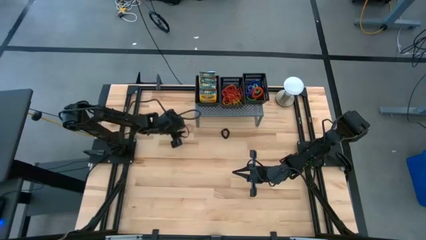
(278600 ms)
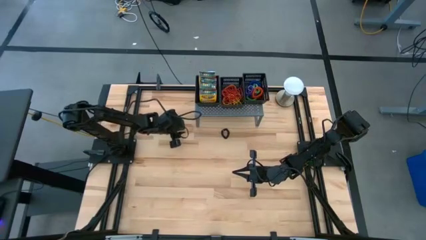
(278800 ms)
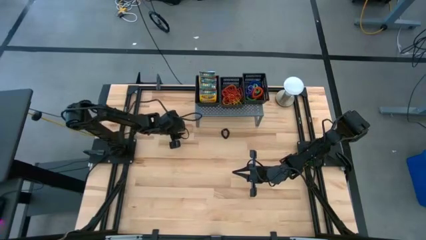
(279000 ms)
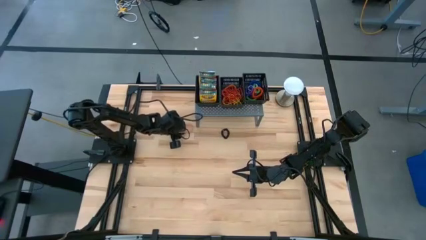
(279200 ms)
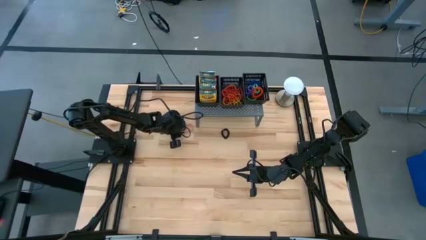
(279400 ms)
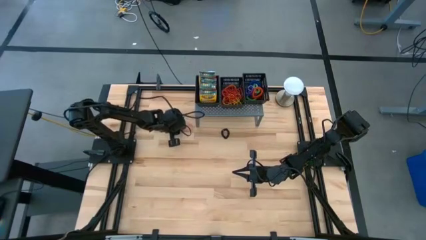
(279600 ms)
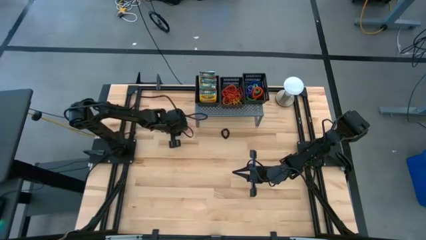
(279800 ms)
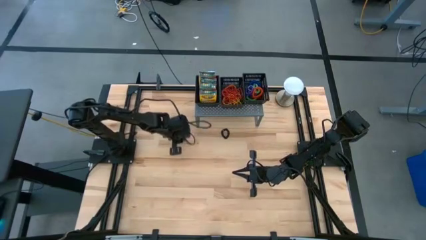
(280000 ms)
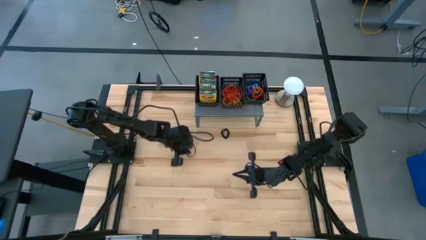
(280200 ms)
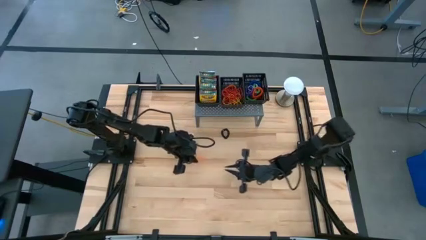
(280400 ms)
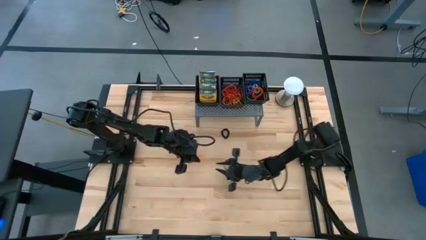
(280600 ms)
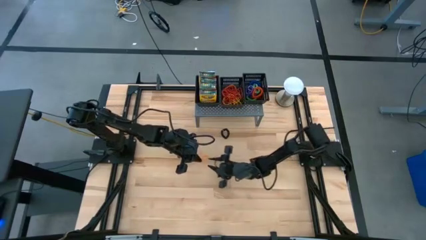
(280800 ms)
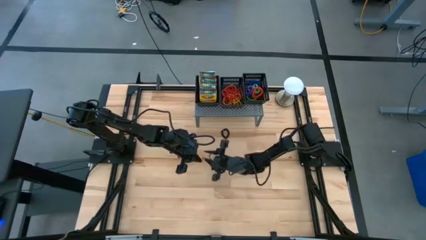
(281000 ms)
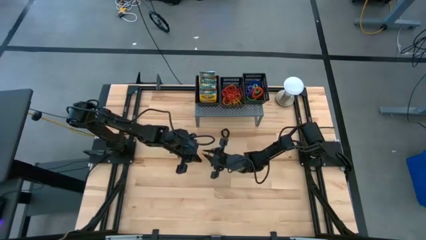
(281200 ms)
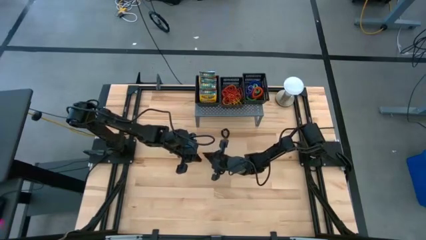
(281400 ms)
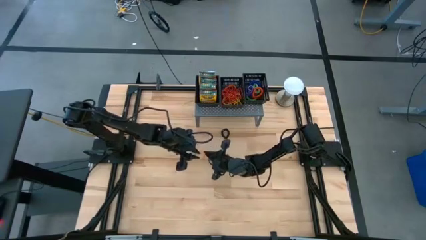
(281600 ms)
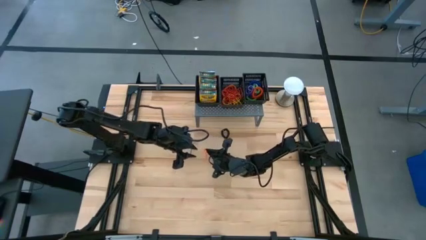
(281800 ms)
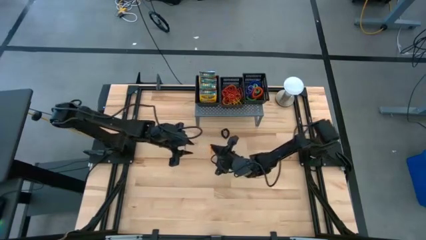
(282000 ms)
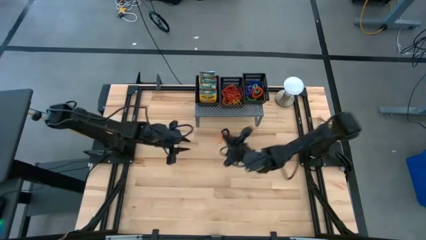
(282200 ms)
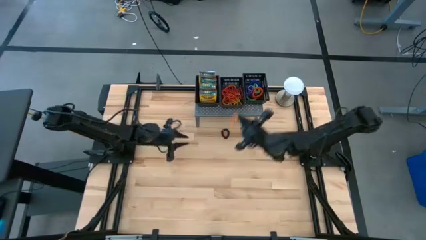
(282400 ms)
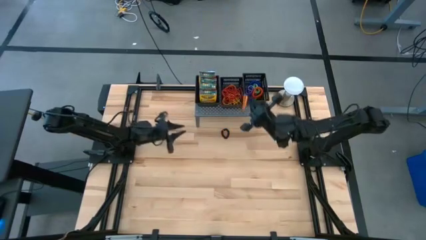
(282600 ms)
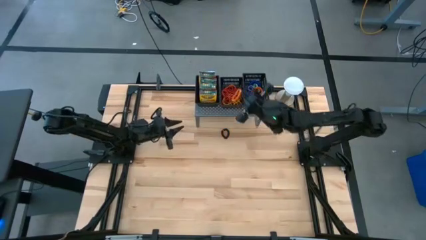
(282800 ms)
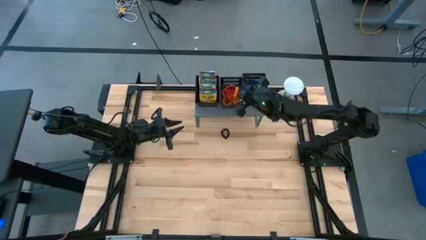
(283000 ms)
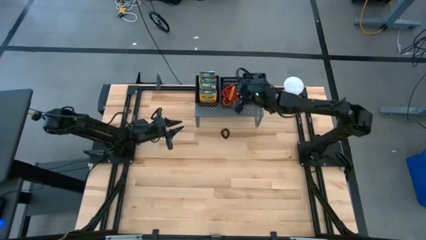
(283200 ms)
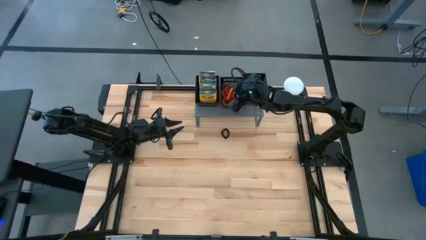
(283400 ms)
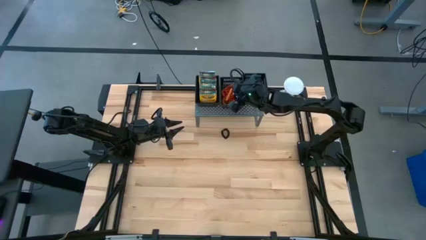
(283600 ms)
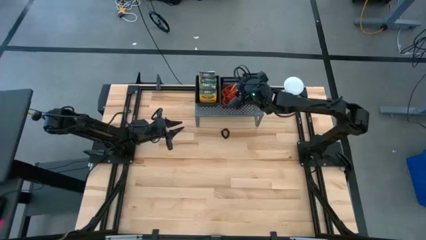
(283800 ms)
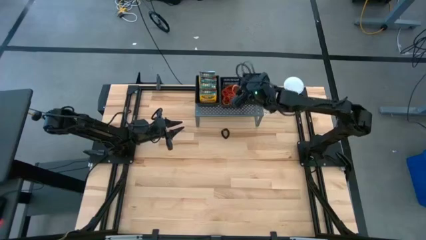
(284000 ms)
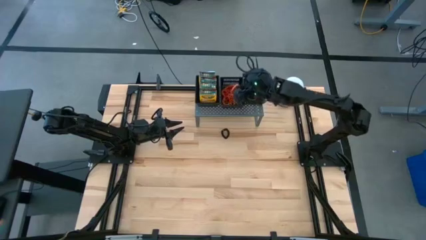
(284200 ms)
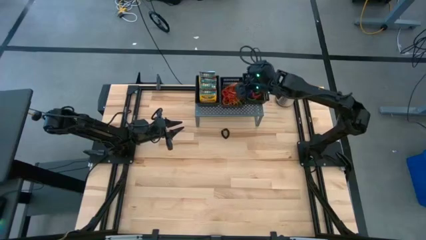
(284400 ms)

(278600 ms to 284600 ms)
Task: Sort rubber bands into baskets
Put the orange rubber band into the middle black basket on the shelf

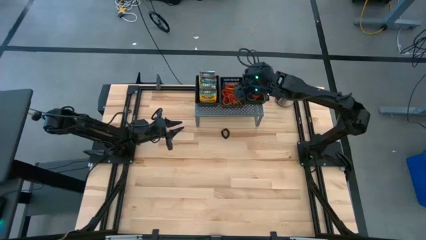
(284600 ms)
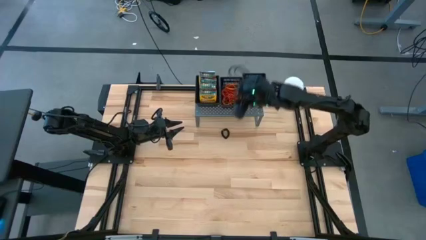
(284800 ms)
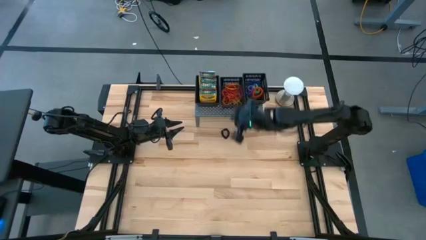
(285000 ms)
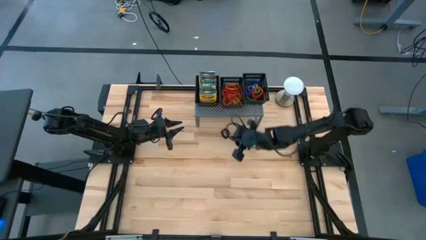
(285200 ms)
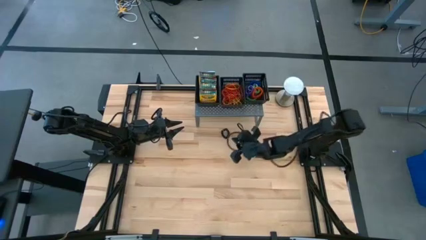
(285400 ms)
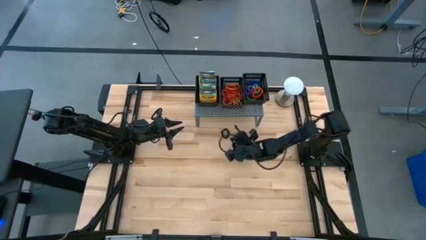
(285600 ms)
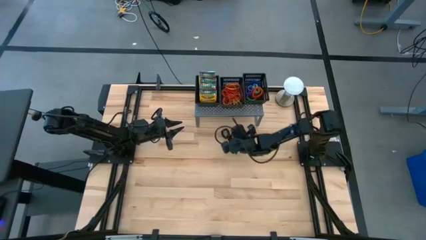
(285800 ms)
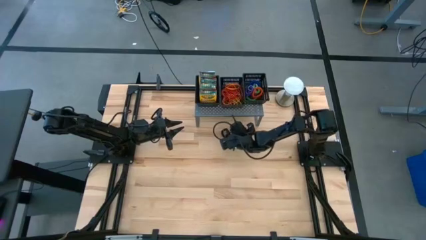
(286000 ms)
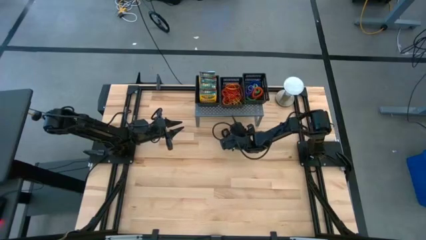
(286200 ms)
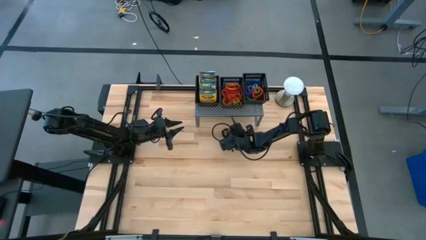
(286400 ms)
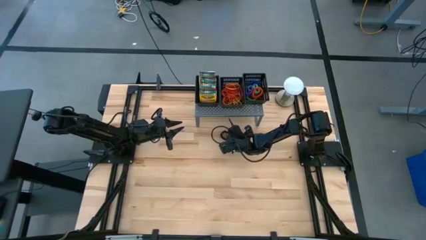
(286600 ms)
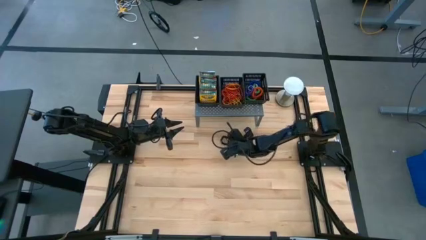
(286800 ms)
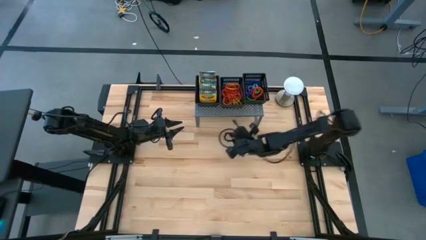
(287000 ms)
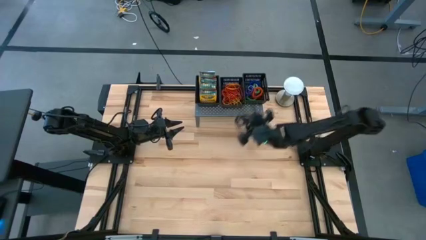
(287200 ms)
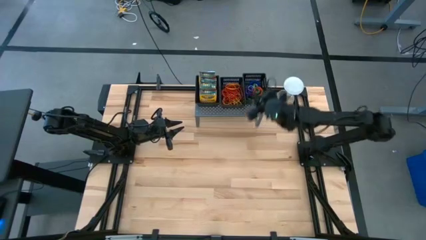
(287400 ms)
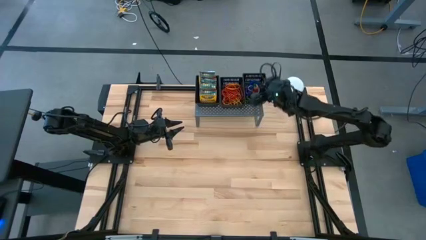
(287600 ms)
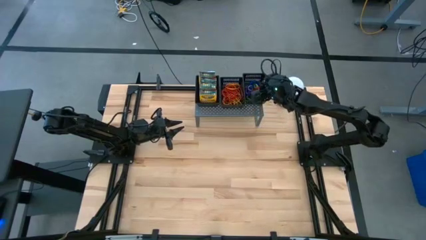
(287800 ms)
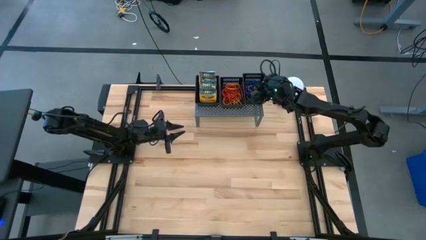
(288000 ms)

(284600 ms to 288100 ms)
Put the black spring rubberband into the right black basket on the shelf

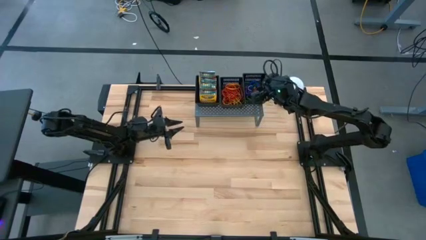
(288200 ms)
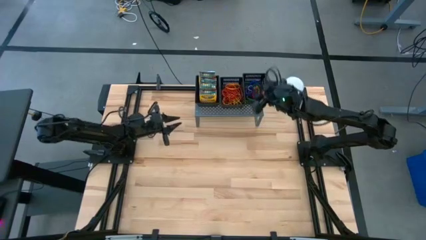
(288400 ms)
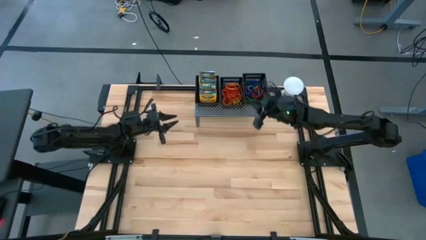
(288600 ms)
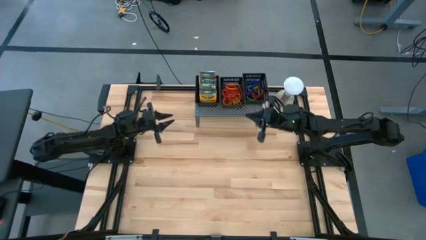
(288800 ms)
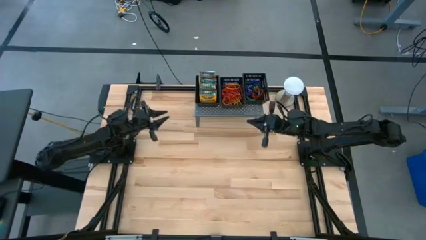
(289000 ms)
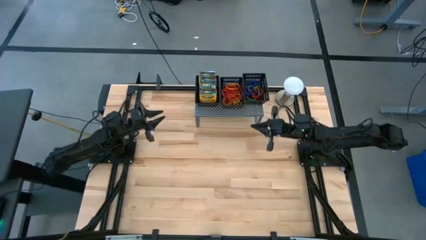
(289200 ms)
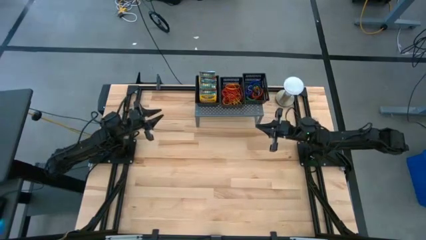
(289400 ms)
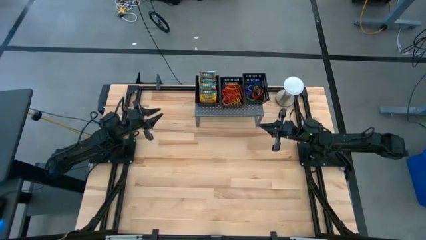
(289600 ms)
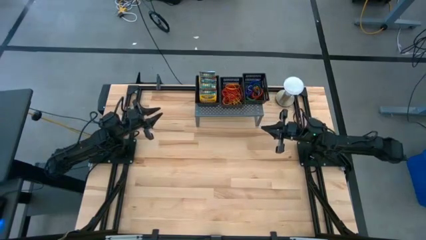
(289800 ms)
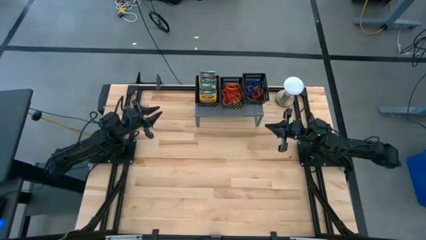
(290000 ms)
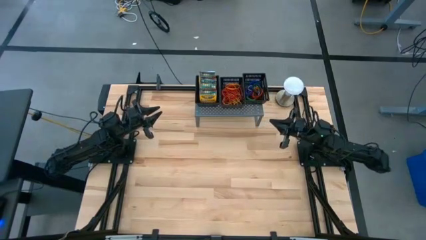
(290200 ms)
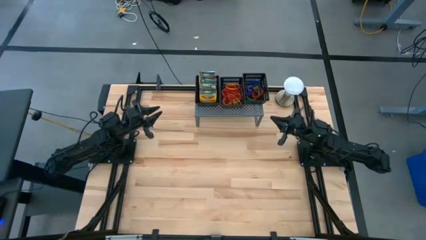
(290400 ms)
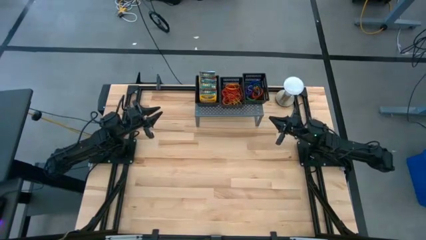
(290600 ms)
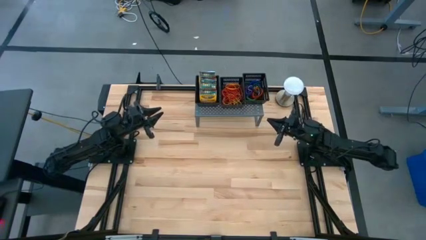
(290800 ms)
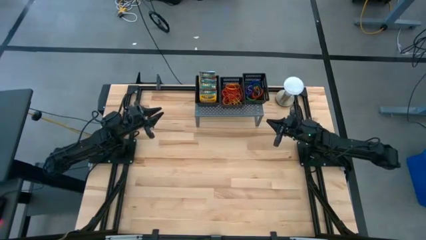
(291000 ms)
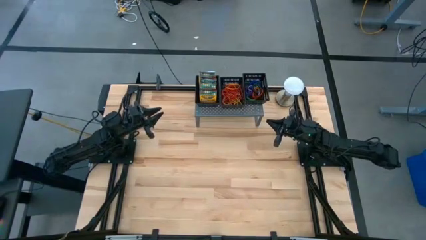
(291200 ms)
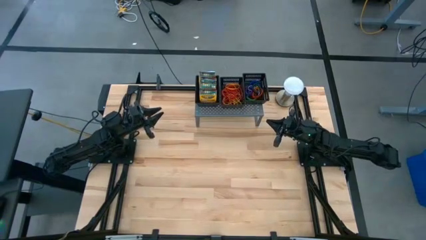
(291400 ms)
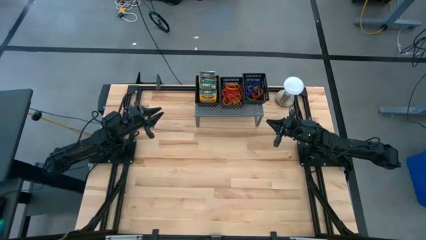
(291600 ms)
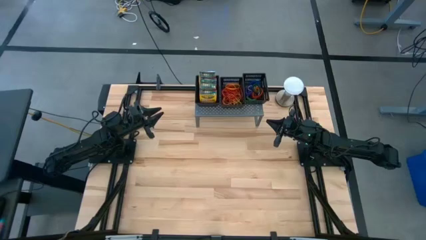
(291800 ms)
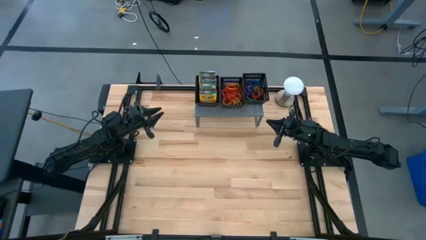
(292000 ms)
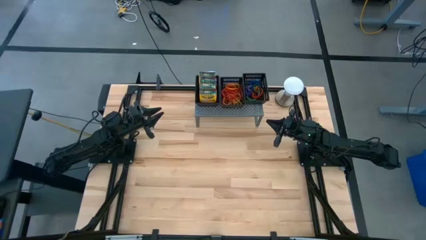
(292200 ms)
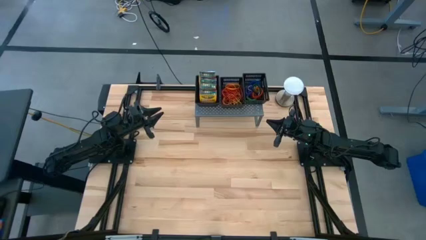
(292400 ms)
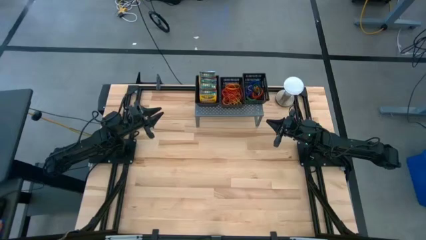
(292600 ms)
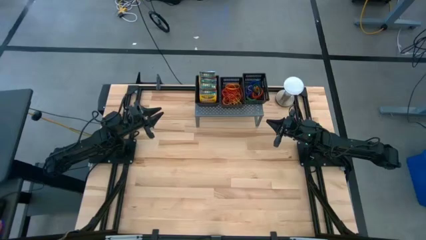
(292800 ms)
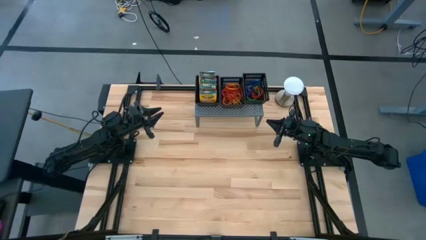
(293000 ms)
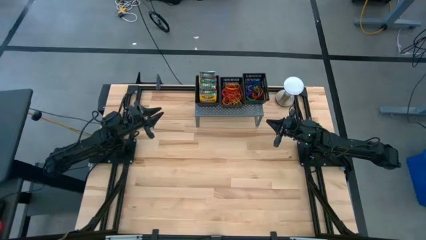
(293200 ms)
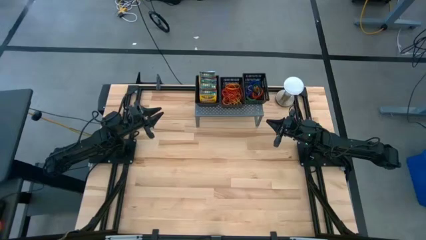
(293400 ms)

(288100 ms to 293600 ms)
Return to Home Position

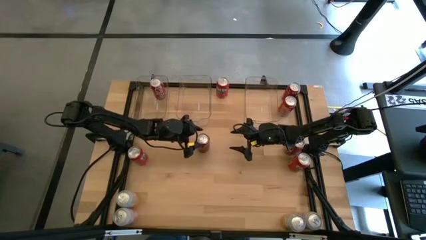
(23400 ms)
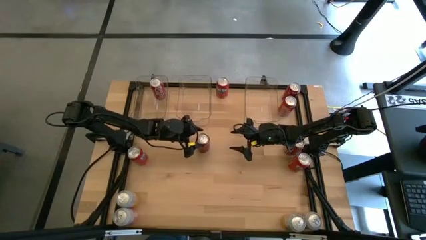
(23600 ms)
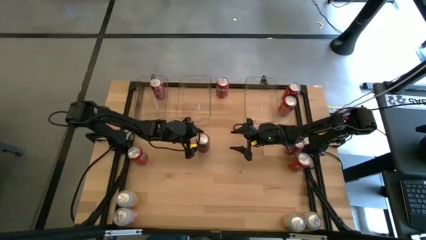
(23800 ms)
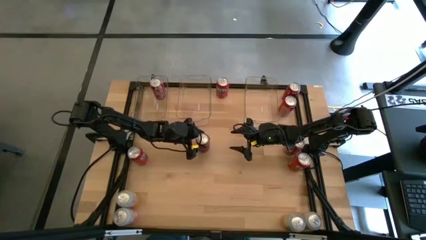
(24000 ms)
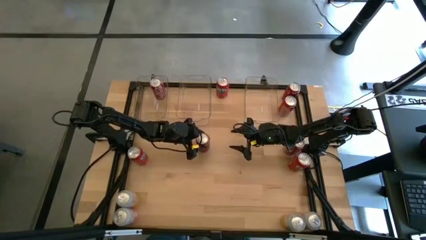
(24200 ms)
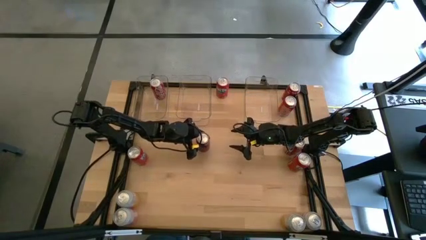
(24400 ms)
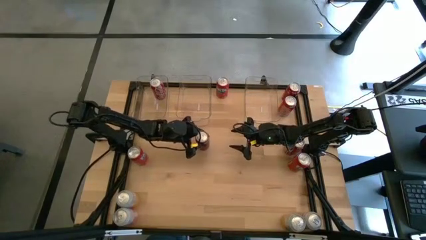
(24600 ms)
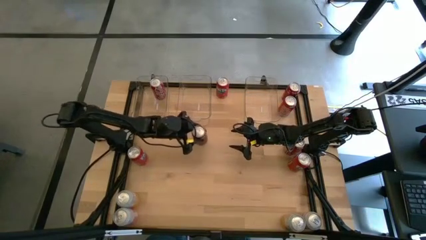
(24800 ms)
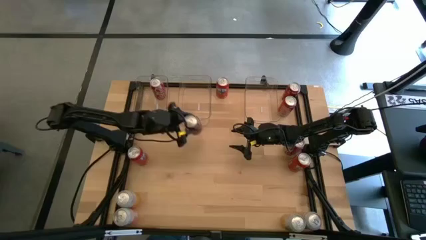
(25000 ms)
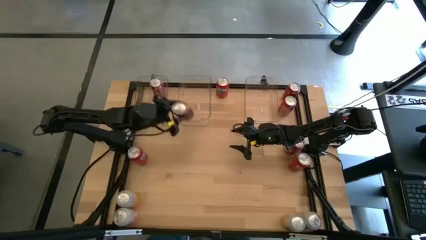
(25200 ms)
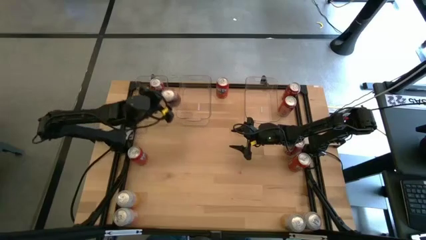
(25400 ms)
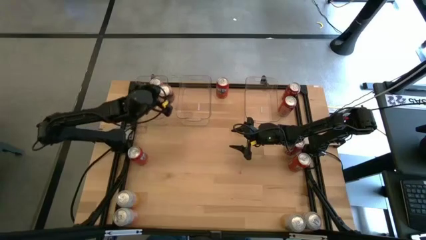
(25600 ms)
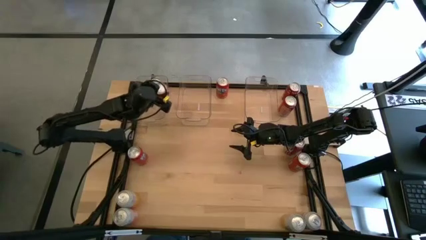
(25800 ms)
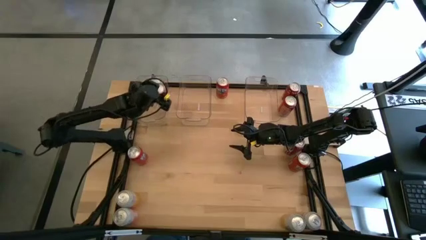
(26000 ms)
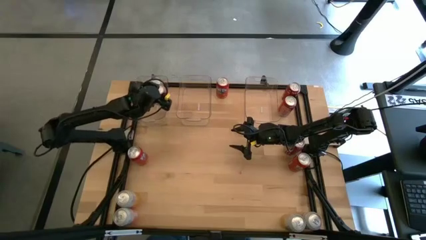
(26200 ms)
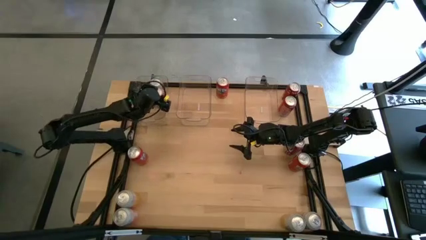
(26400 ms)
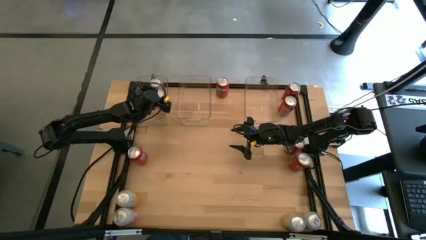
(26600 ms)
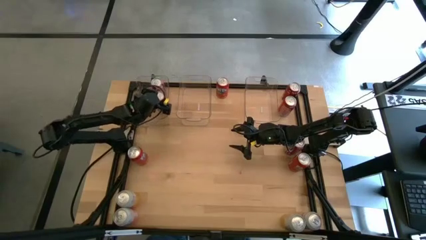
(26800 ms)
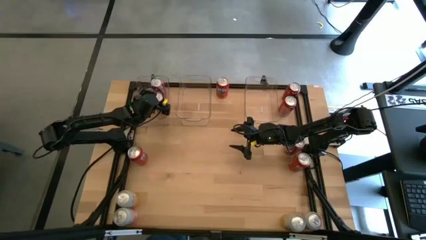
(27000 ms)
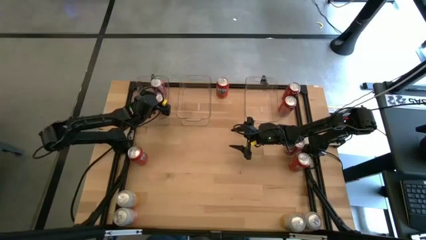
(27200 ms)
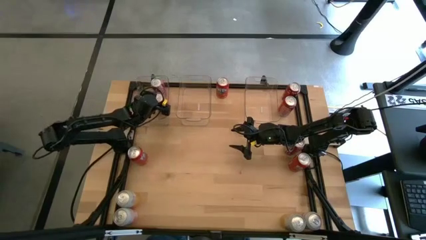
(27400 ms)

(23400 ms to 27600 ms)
Task: Sort soda cans
Put the red soda can into the left transparent bin
